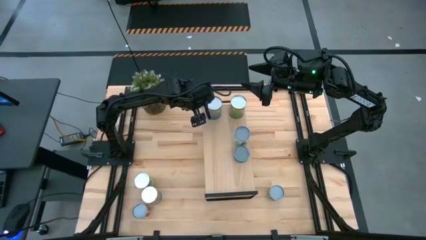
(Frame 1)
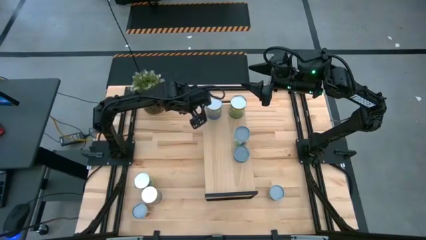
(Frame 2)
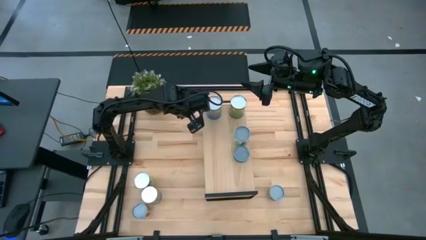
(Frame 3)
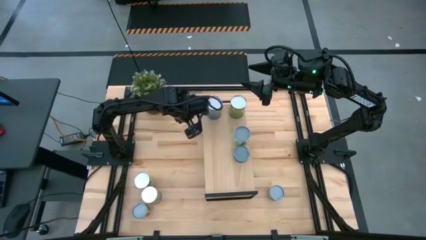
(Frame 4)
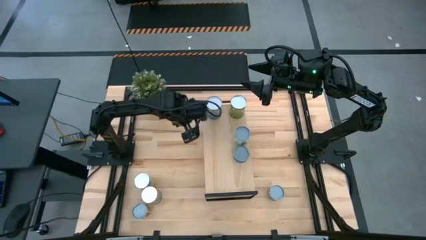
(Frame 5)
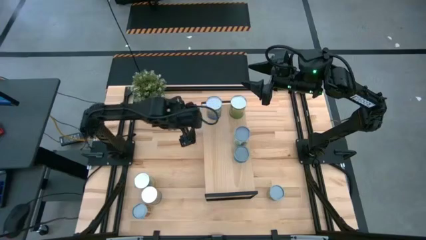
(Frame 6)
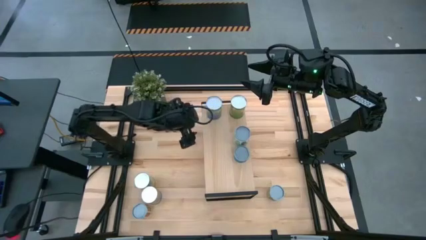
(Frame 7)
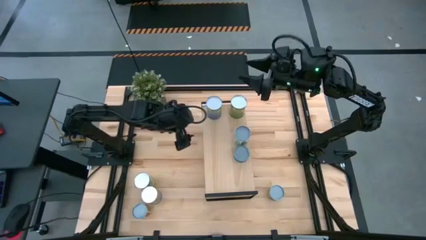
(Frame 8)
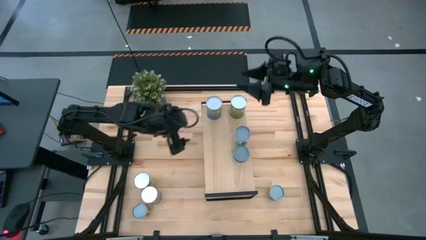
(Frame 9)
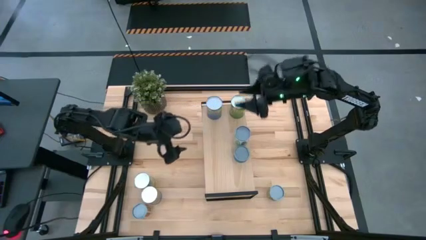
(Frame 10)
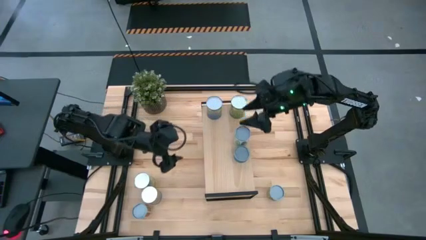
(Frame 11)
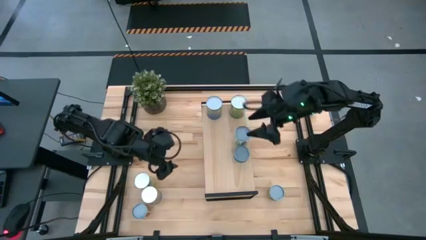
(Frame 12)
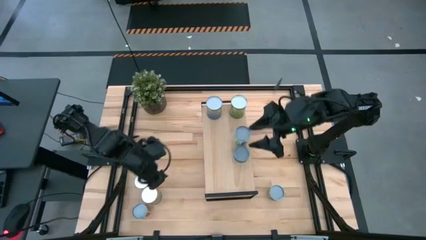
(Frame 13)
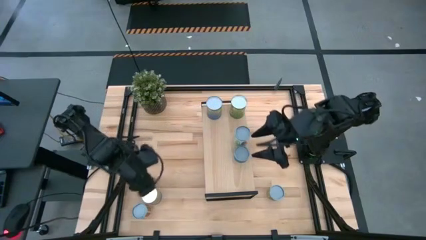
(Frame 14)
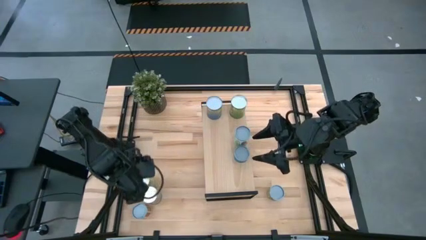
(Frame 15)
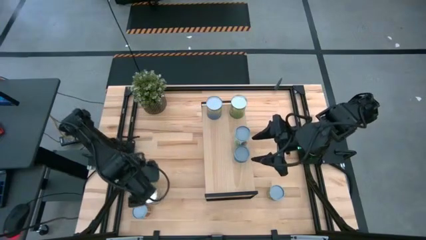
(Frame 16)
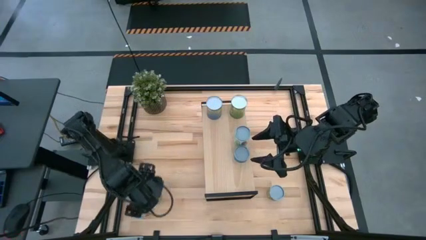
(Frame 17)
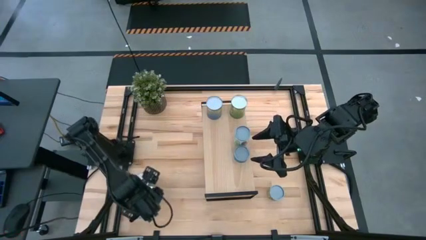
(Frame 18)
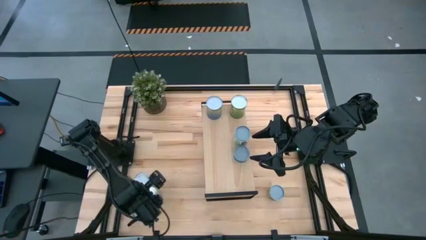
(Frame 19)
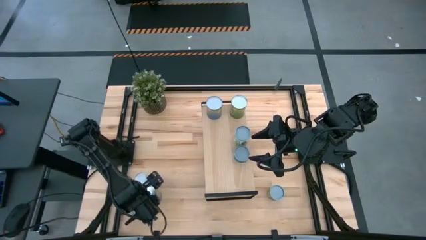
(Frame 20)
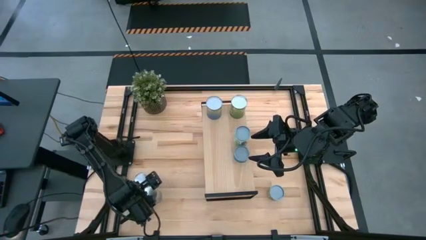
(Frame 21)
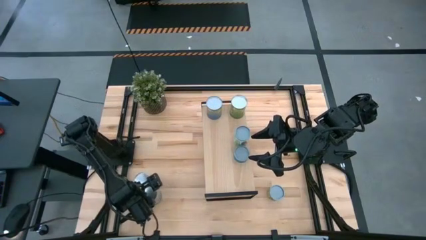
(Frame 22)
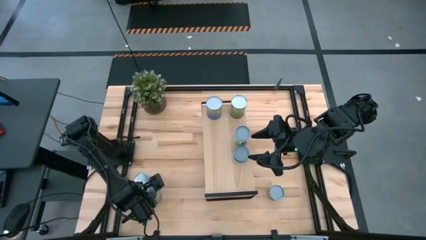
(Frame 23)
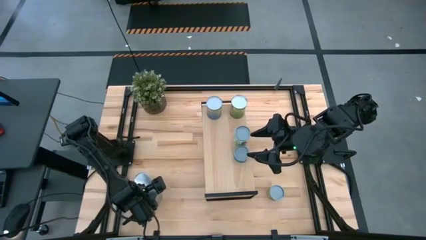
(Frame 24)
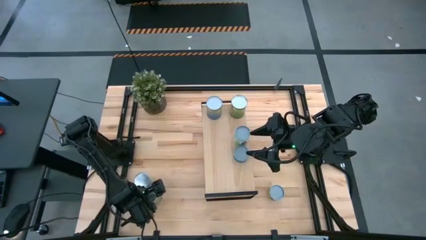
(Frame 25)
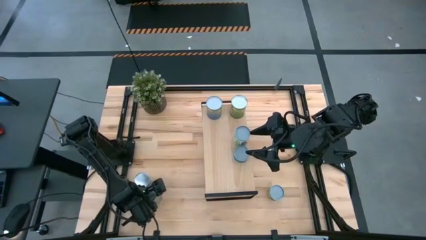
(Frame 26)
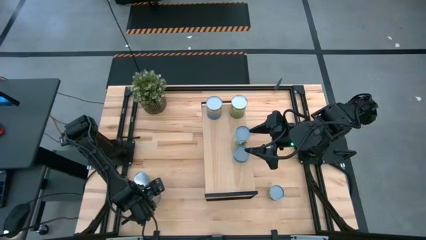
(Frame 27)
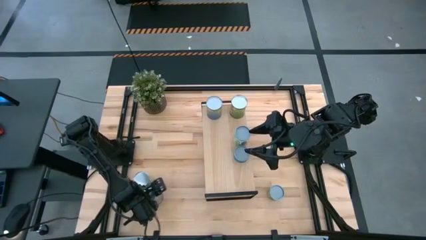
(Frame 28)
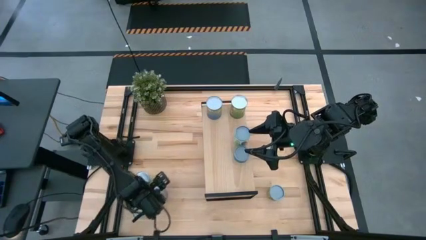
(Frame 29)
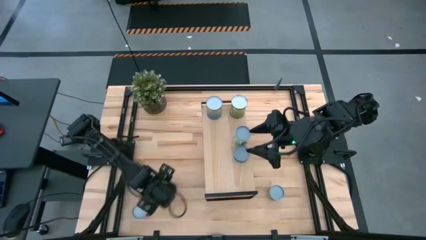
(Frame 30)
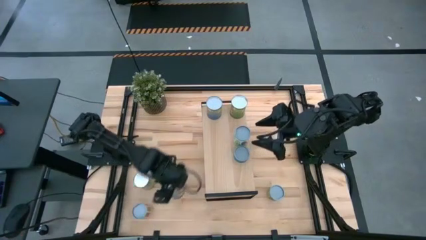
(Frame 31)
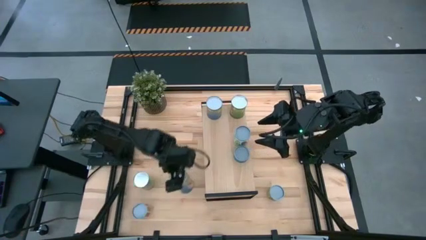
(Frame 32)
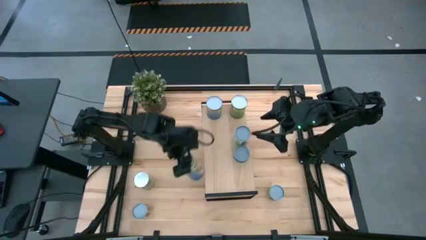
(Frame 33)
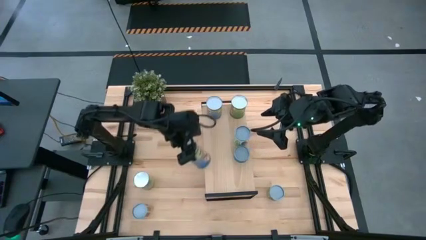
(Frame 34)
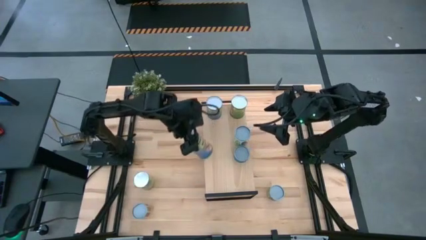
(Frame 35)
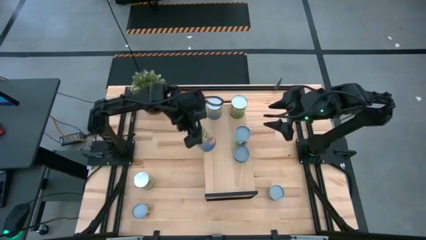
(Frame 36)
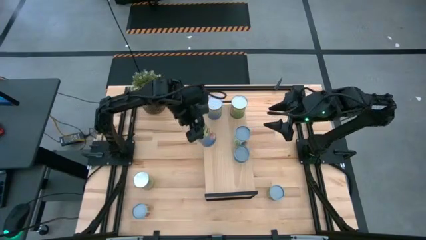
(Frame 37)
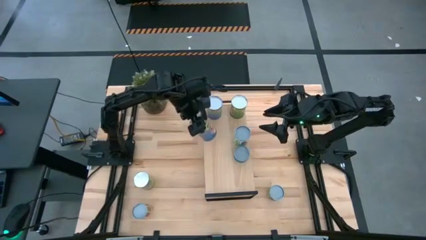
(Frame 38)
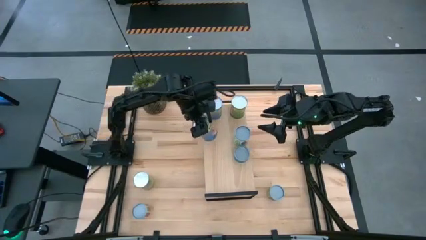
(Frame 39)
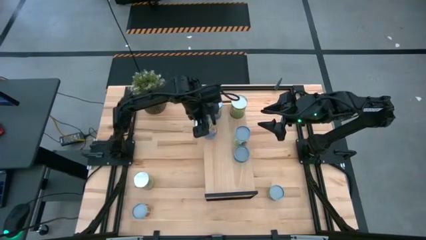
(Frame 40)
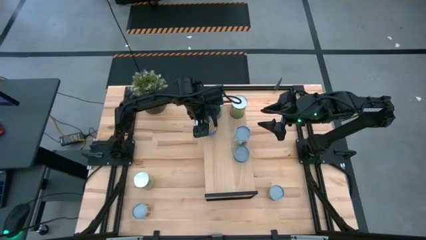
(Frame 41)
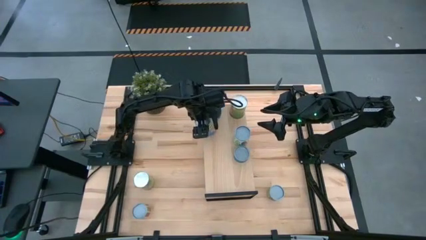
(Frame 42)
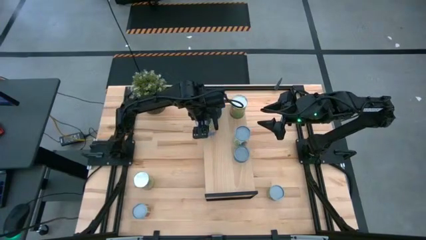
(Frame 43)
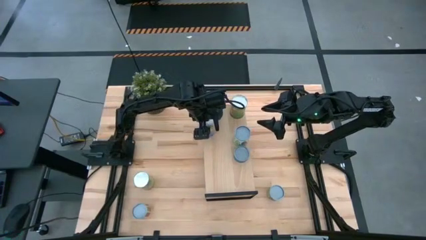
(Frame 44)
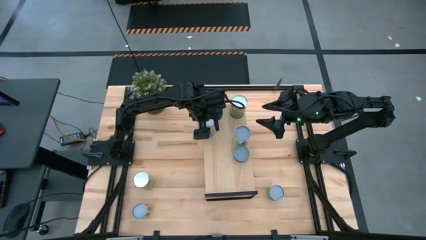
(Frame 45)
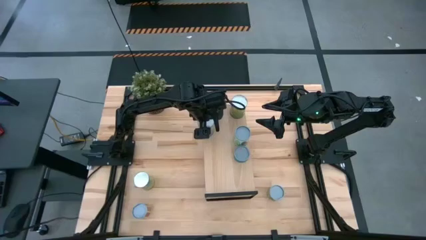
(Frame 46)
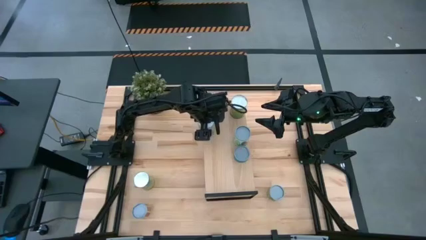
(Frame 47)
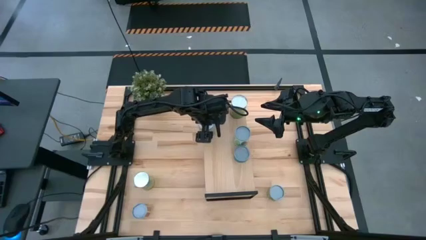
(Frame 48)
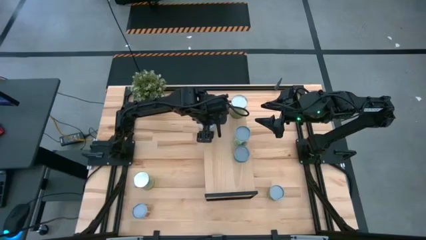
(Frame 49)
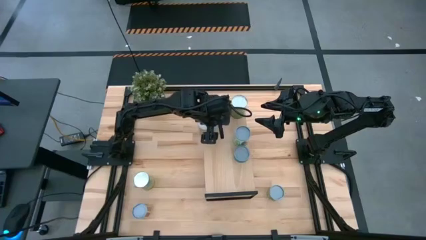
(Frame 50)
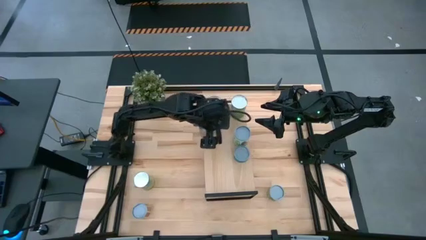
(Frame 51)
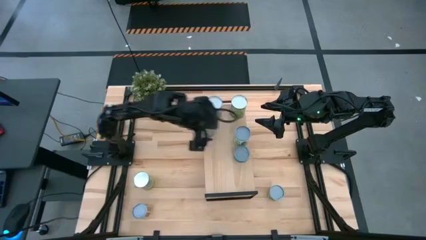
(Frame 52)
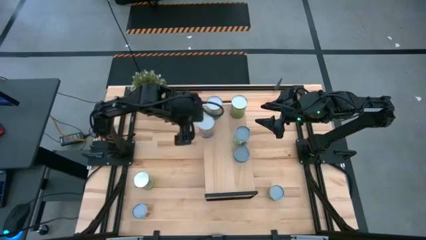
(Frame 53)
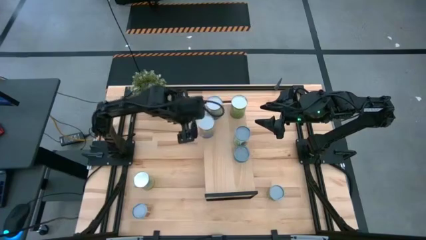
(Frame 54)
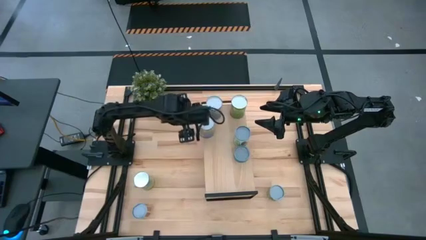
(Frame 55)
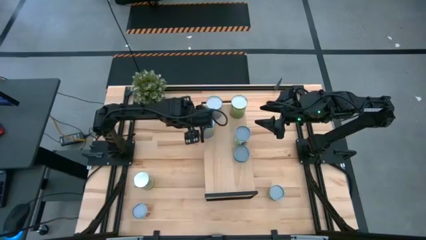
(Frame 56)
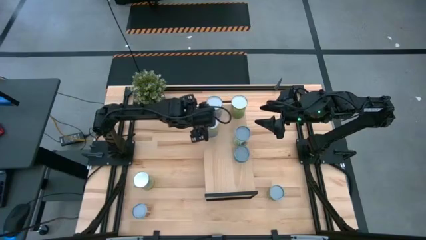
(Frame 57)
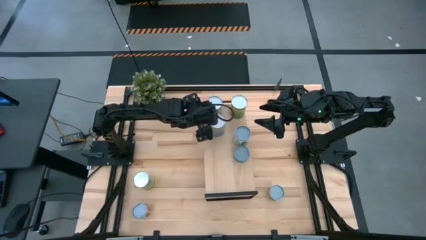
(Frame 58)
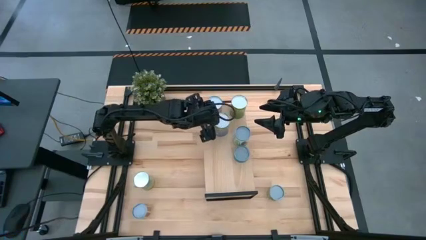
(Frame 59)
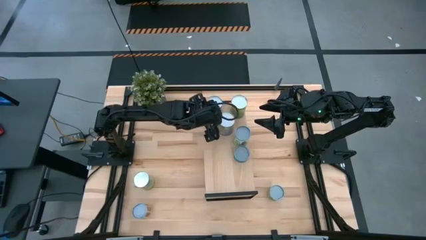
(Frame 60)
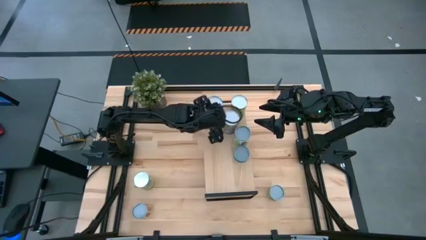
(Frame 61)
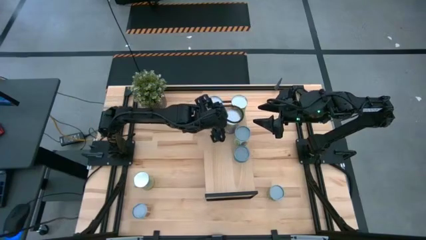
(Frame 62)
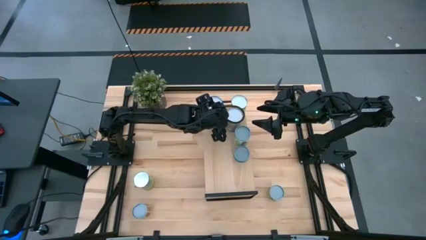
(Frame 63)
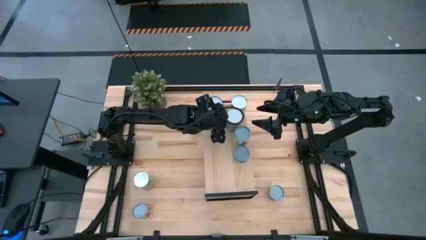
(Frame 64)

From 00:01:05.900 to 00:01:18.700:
Task: Pick and place cans onto a shelf
Put the canned peaches on the shelf
